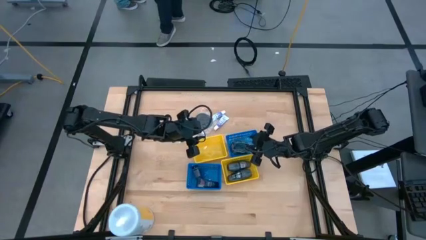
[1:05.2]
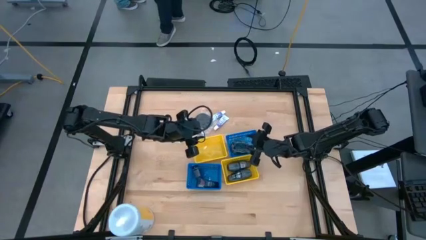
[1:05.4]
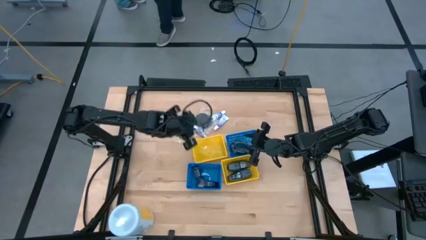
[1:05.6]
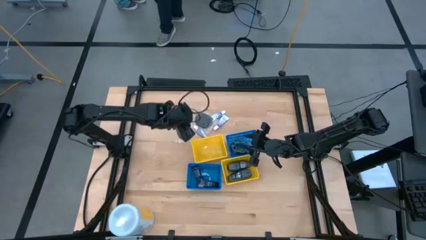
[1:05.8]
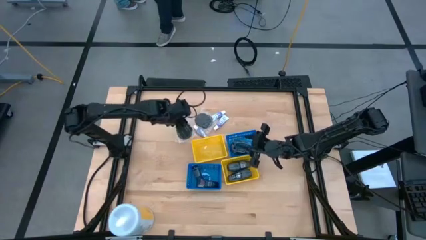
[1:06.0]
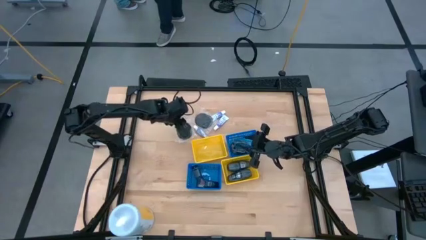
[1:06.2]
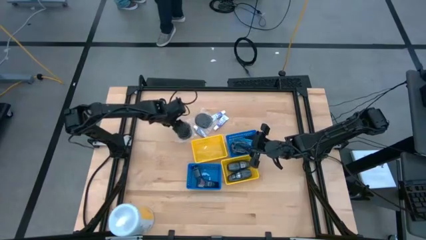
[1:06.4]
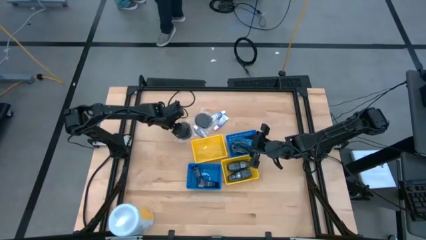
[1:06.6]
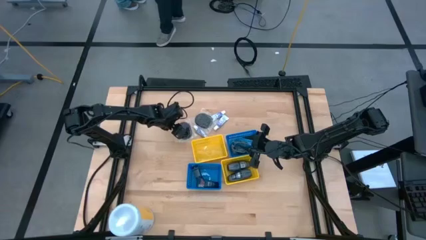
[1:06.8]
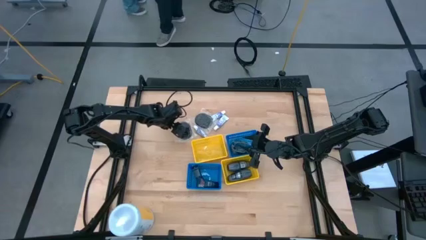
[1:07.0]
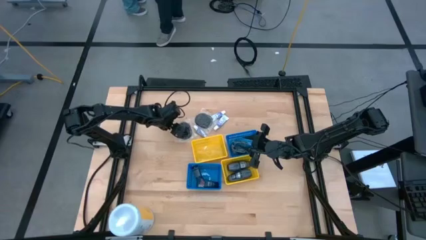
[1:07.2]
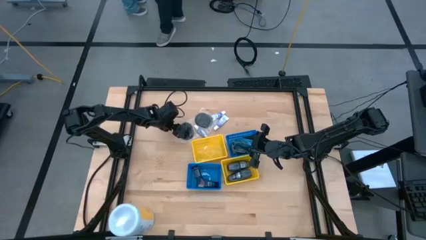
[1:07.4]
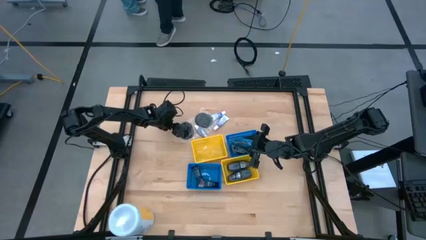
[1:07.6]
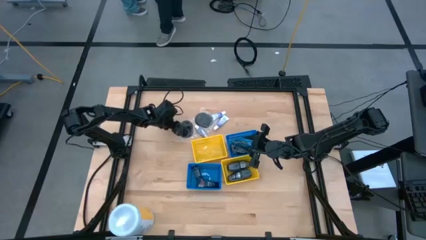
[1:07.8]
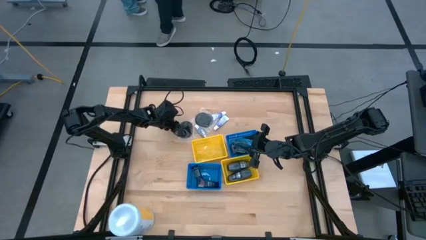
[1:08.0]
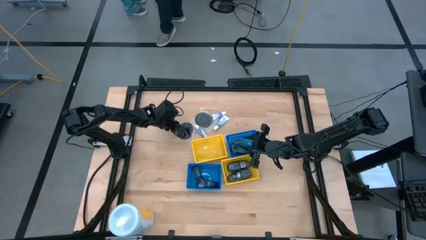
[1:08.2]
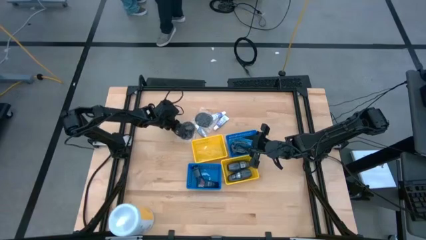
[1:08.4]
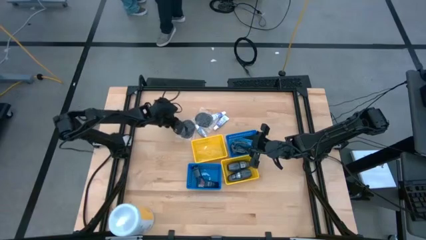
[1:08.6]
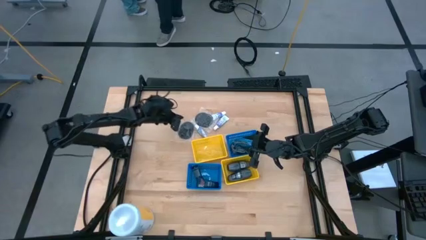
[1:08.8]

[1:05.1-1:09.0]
Task: Pick & Place Travel size toiletries
Put the left hairbrush in the top blue bin

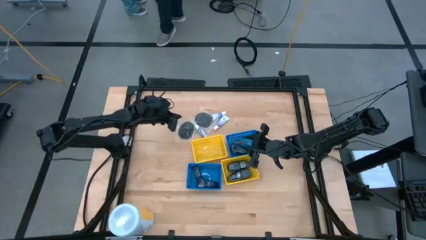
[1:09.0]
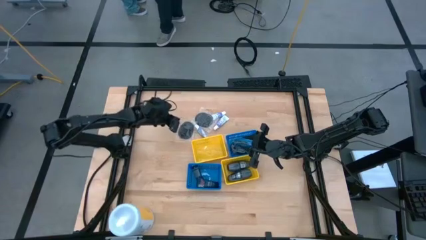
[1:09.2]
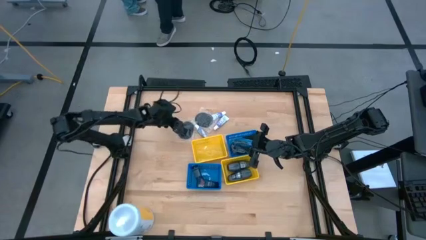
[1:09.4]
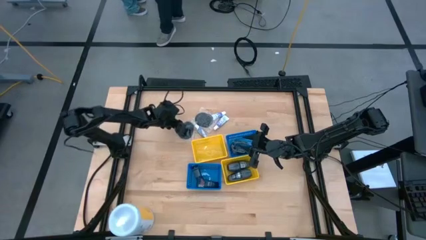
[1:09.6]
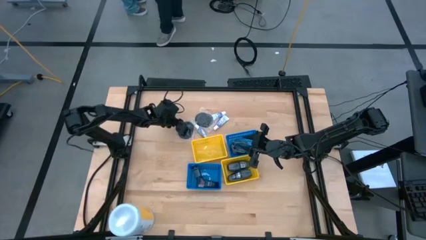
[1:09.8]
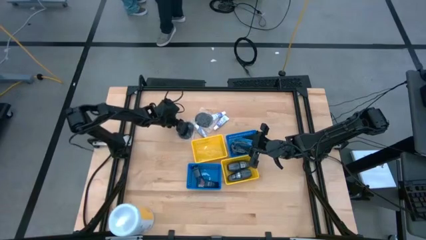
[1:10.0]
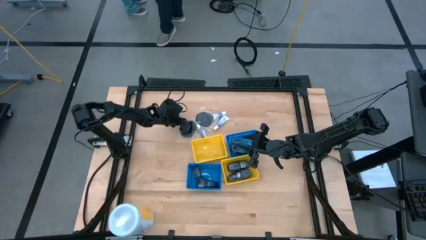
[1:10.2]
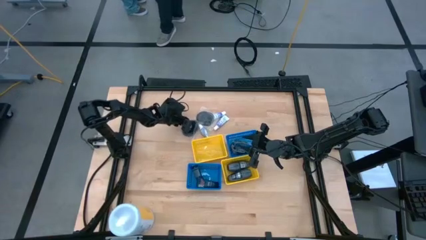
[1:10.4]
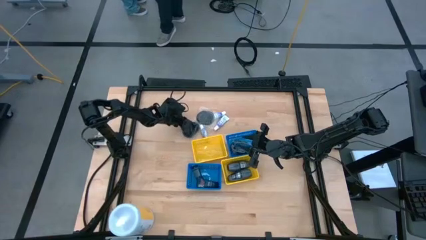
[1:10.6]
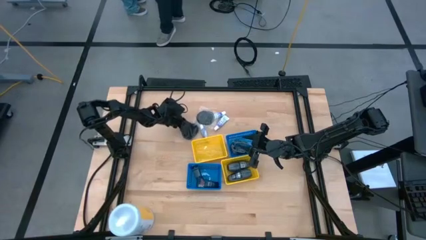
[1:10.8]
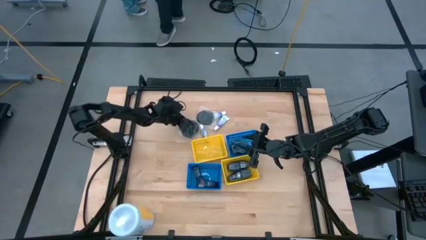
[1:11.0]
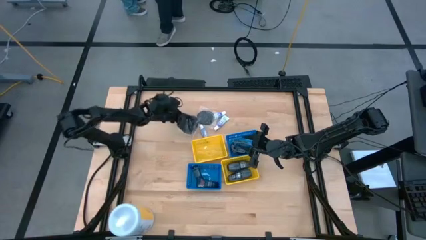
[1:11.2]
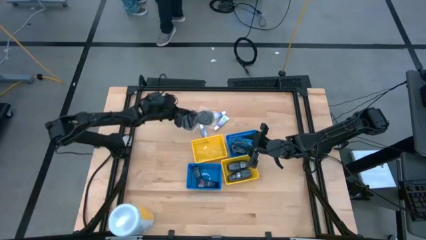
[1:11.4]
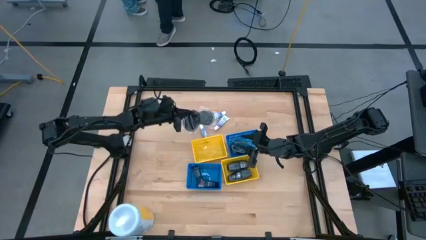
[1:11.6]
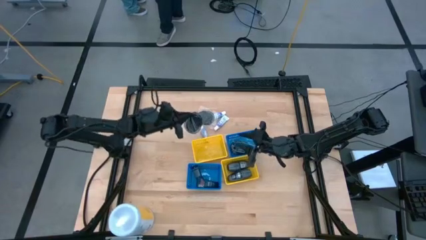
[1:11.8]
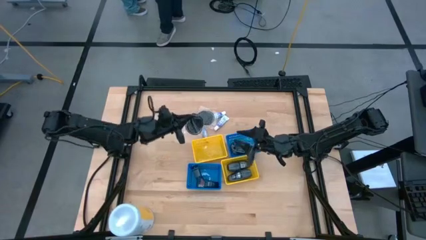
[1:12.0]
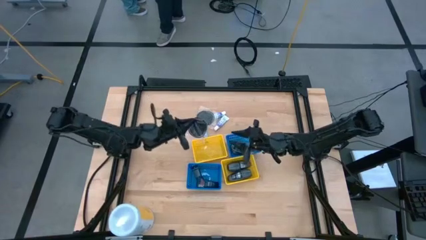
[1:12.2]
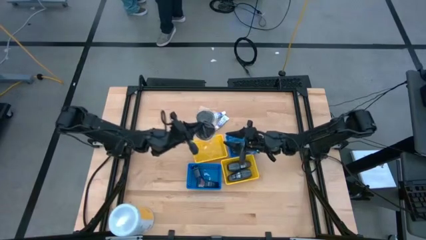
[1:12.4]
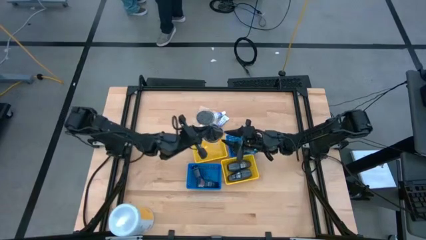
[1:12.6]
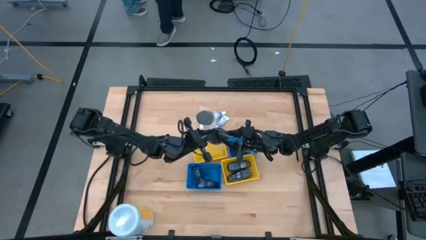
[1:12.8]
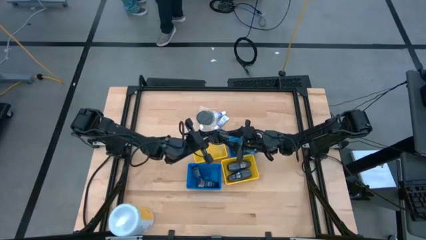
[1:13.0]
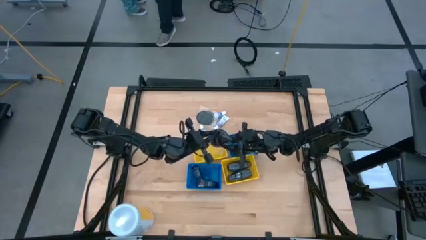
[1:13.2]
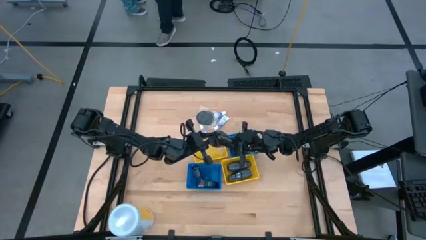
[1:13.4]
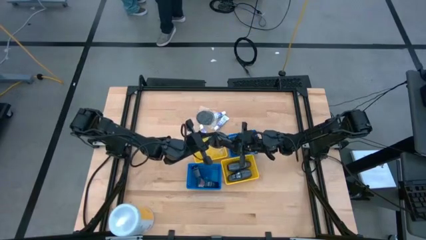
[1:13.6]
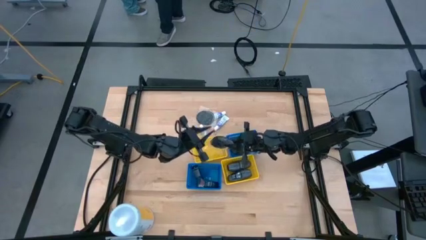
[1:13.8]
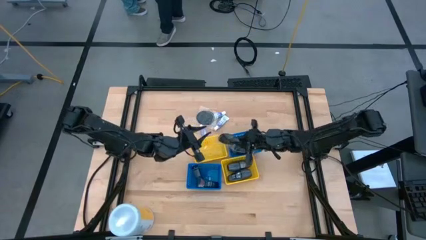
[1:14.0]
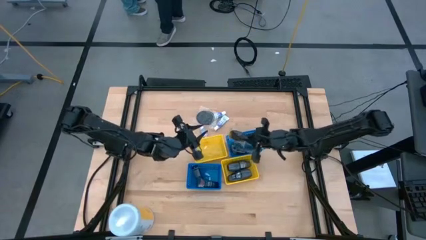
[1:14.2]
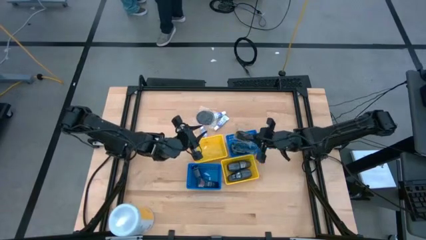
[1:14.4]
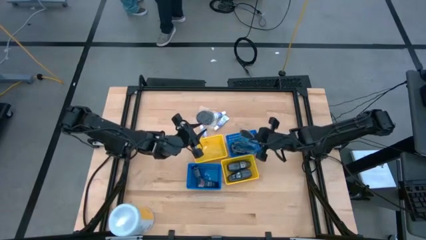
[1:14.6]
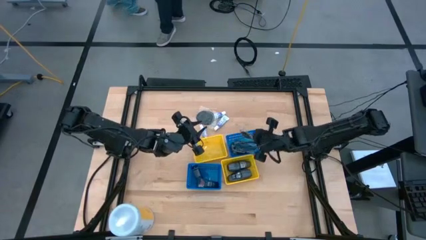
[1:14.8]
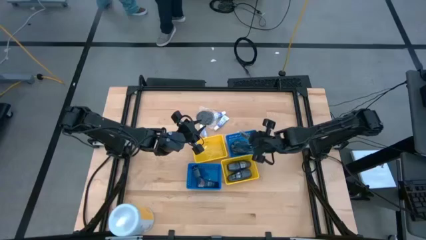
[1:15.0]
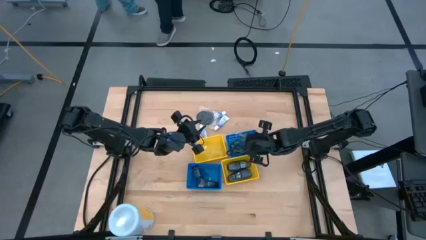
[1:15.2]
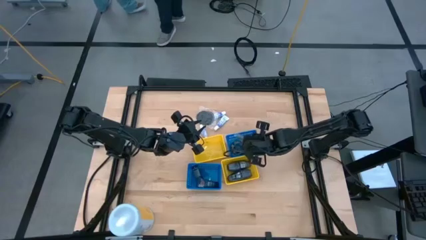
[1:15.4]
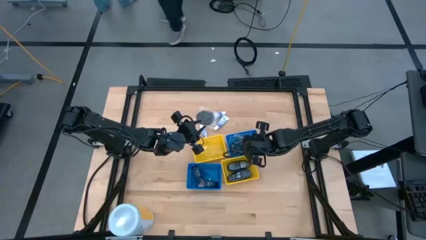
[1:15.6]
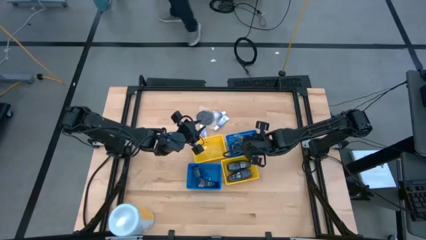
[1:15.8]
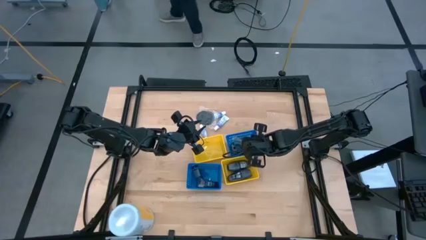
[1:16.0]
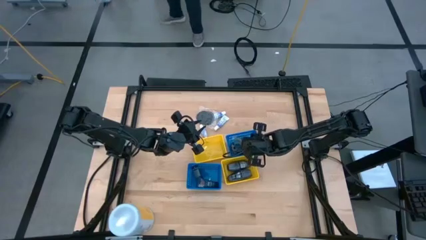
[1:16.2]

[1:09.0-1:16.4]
Put the left hairbrush in the top blue bin

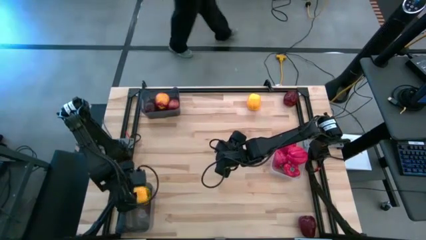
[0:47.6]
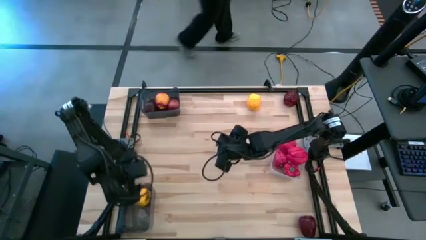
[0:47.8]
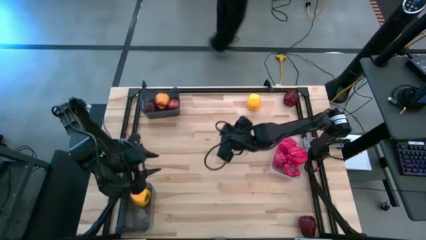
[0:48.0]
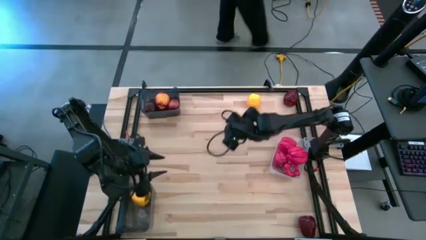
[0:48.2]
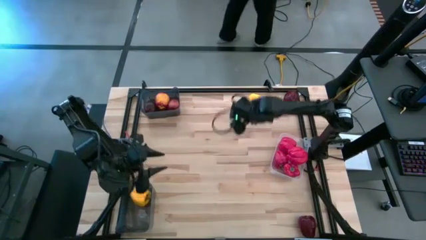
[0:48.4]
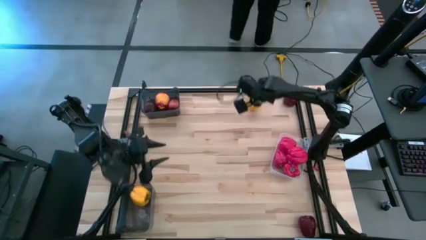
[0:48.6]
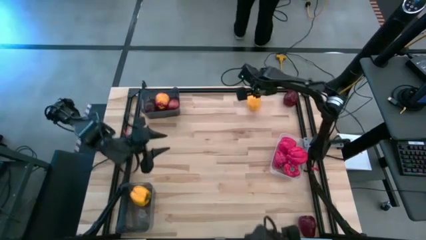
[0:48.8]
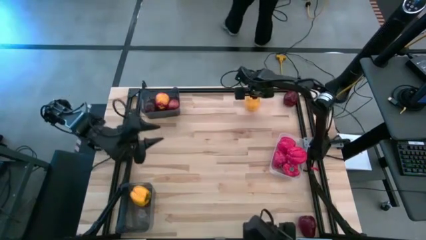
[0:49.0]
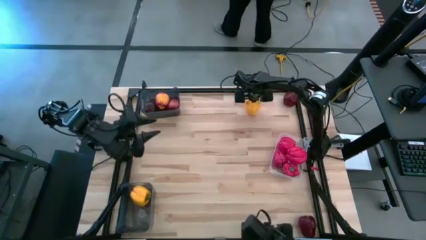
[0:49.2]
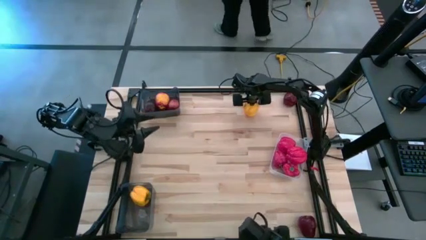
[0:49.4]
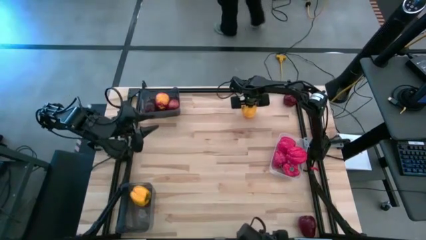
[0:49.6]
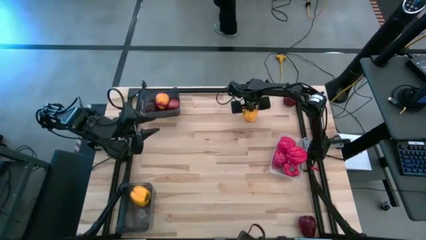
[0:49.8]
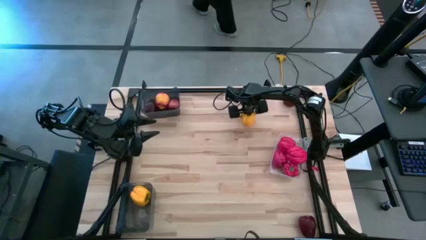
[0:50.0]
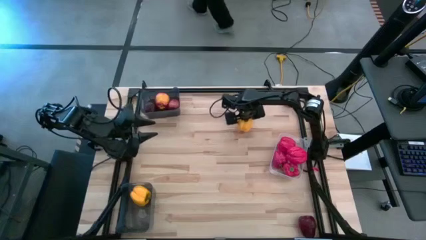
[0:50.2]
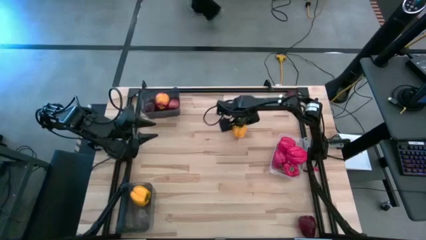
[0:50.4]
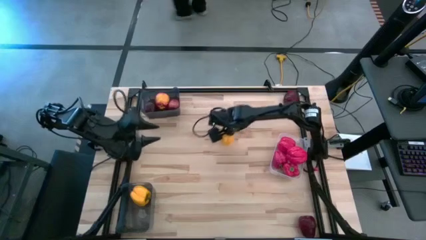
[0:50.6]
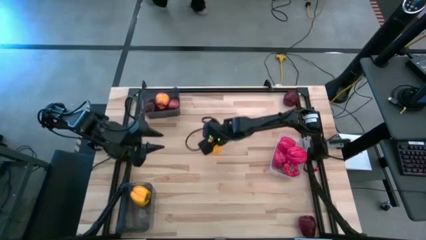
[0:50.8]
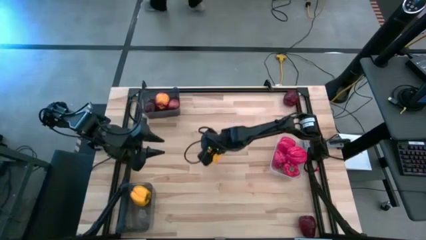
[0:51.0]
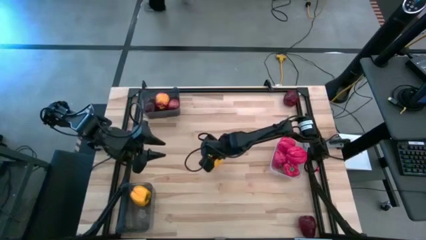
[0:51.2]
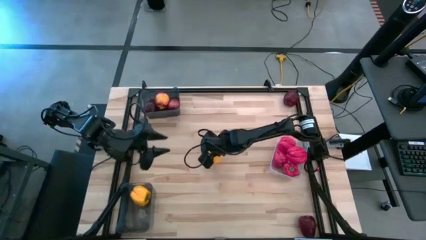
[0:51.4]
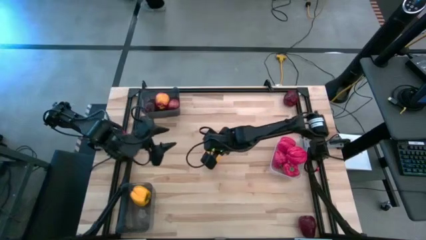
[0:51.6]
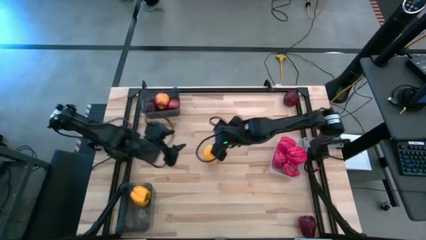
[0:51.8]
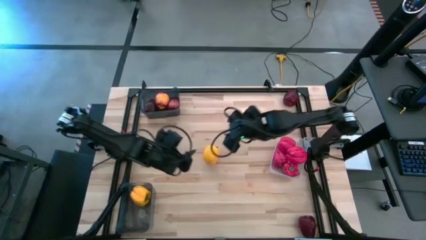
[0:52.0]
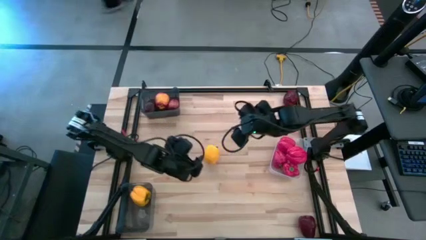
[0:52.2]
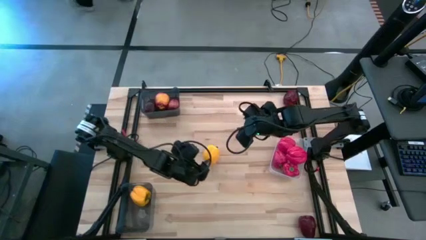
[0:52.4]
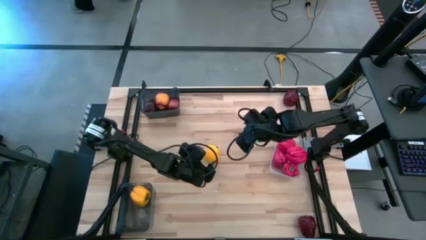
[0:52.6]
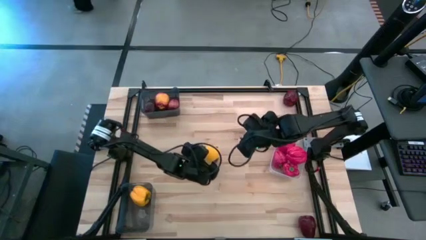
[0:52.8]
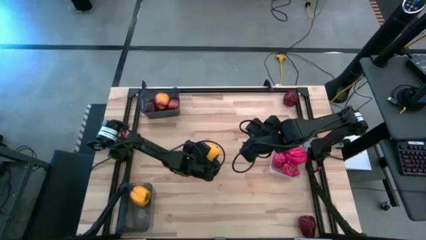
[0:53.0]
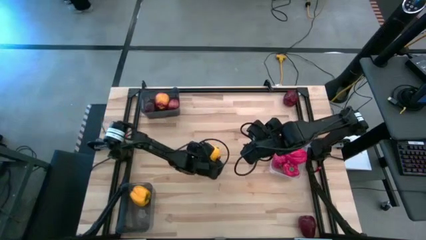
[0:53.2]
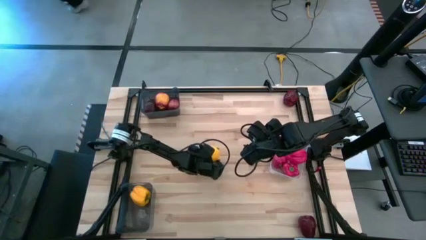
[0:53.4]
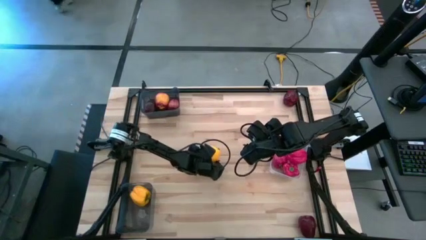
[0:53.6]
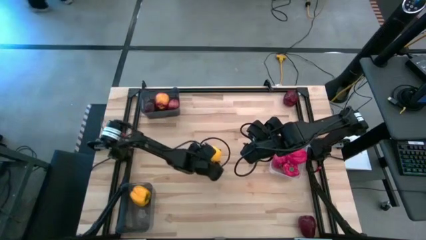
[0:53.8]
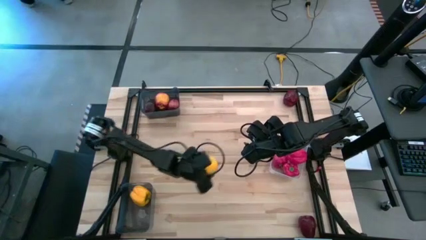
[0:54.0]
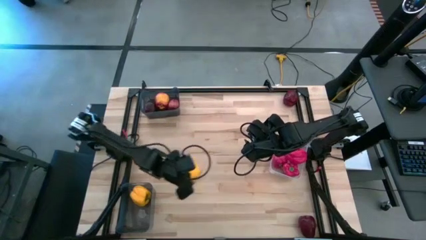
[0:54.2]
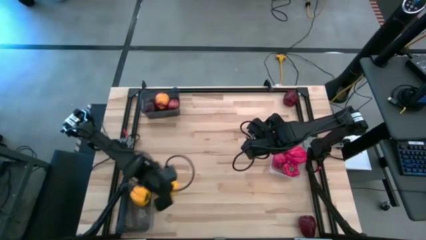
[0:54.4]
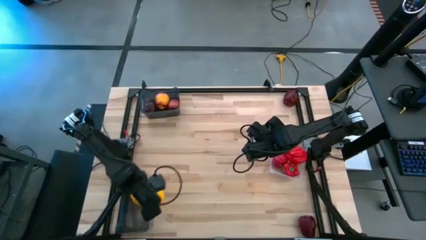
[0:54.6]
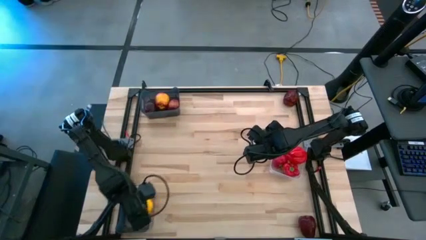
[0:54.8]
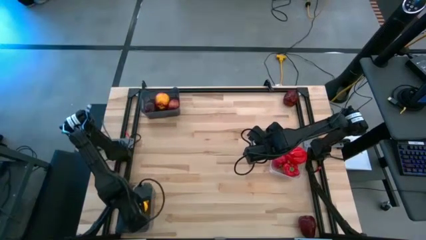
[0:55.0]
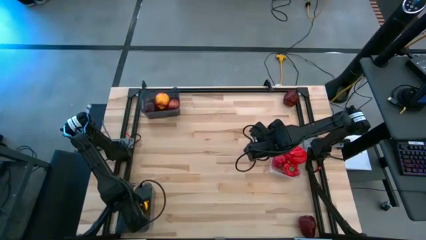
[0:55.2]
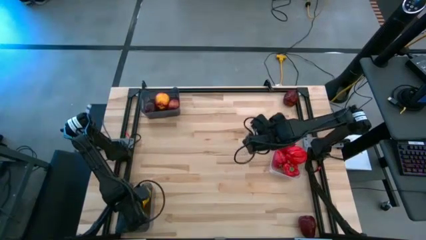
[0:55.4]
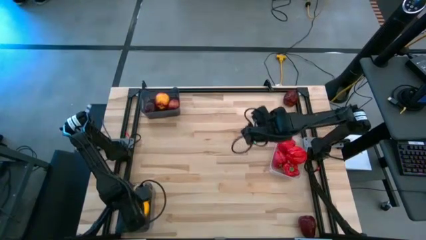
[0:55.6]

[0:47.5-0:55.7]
Task: Sort produce into baskets
Put the yellow bell pepper into the bottom black bin
